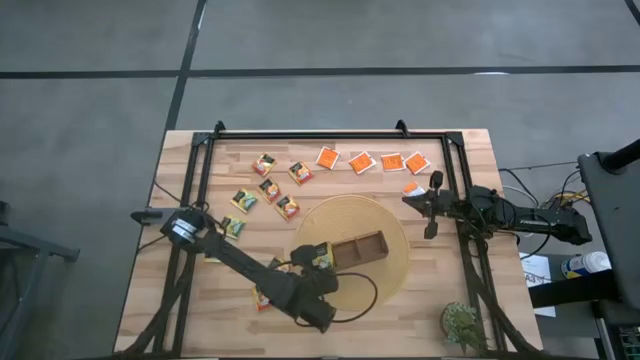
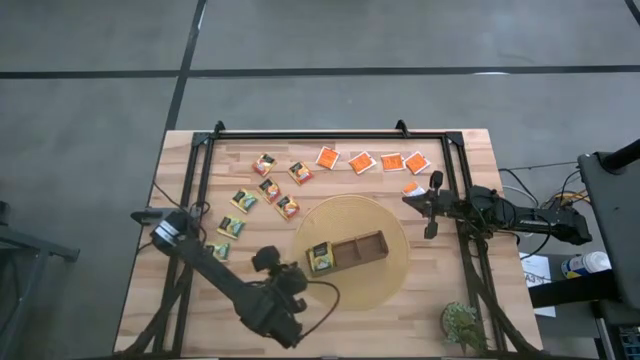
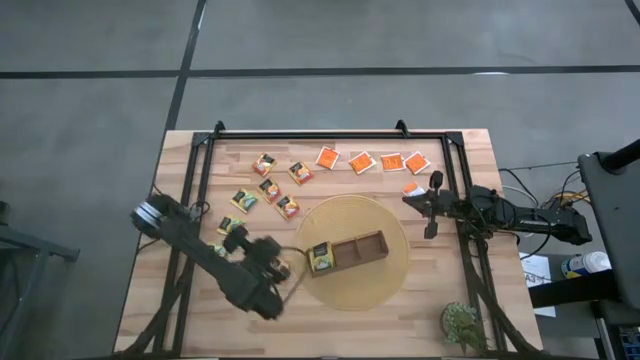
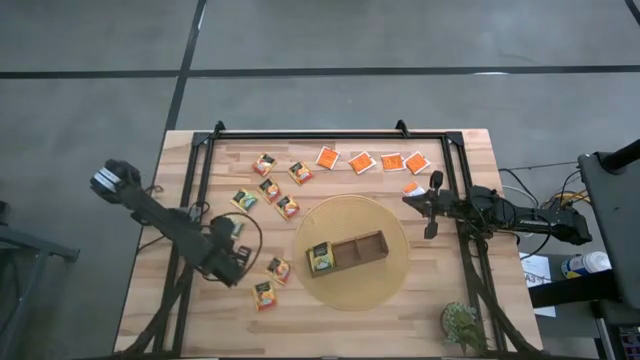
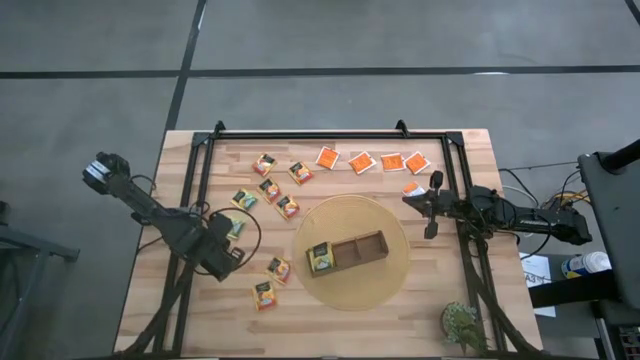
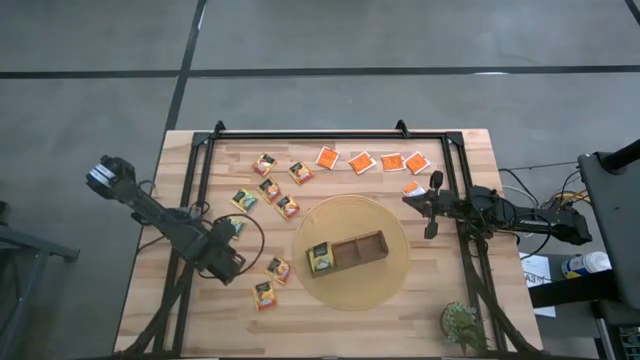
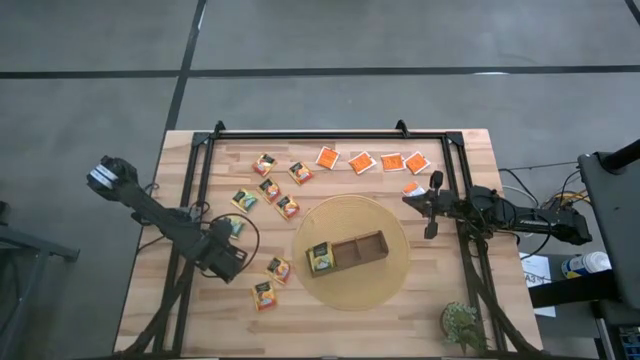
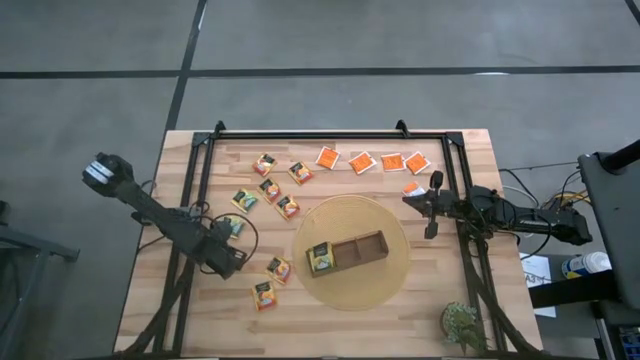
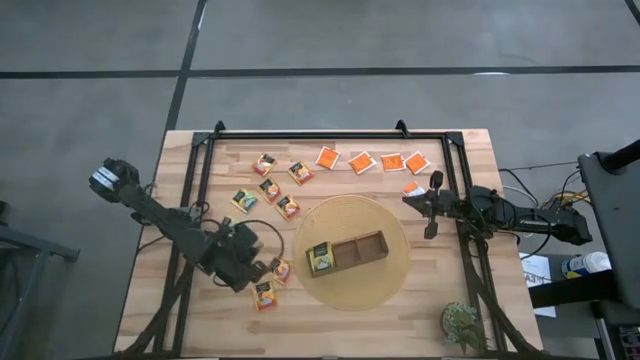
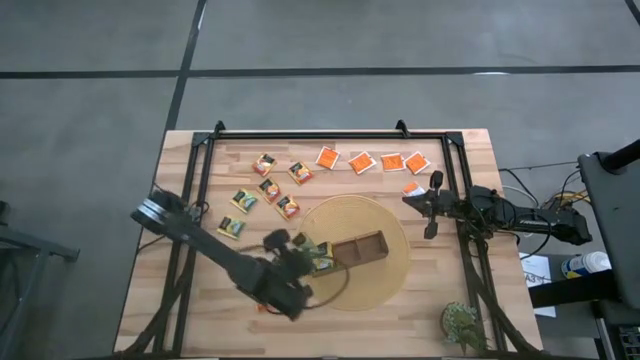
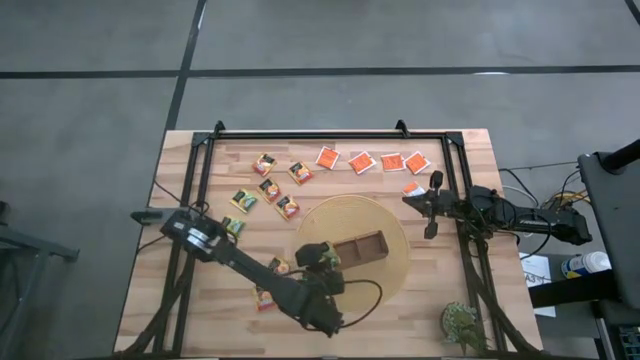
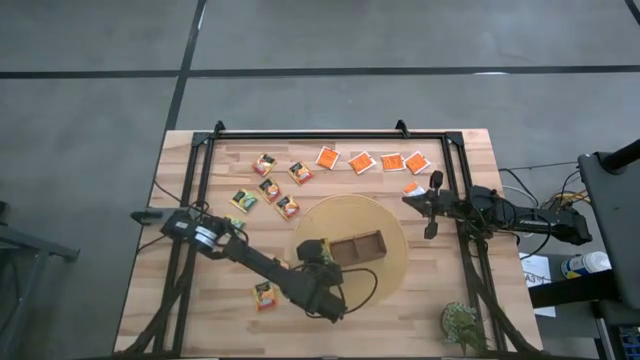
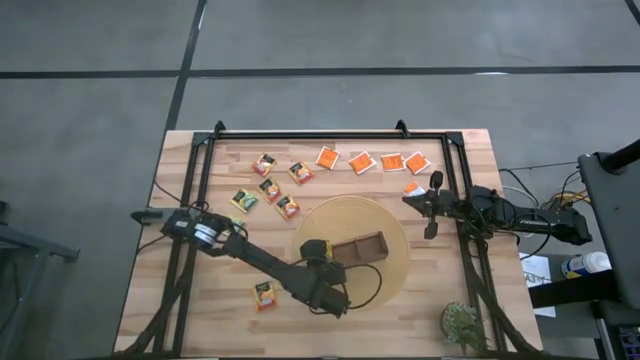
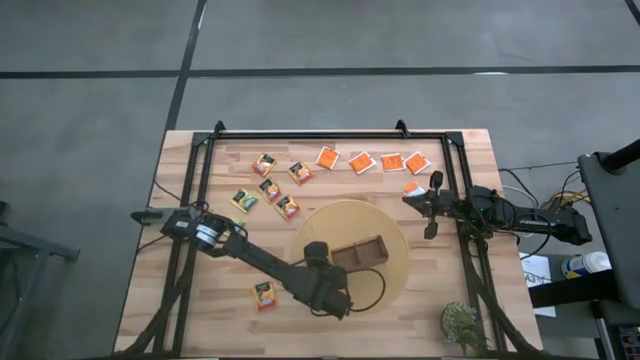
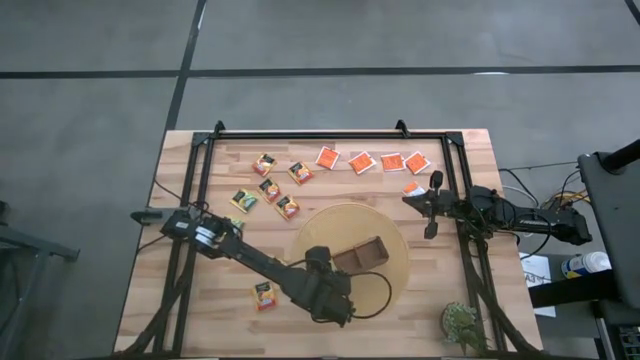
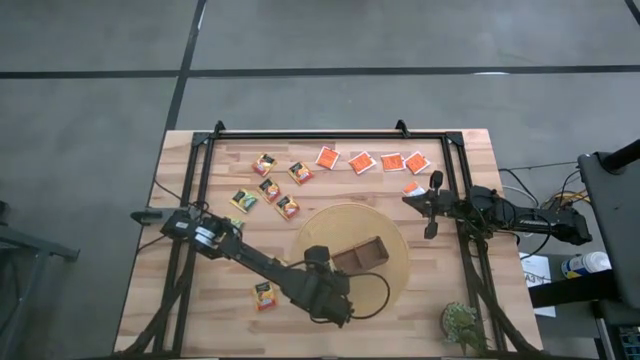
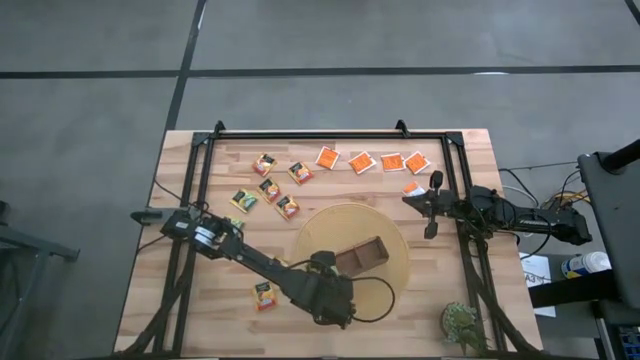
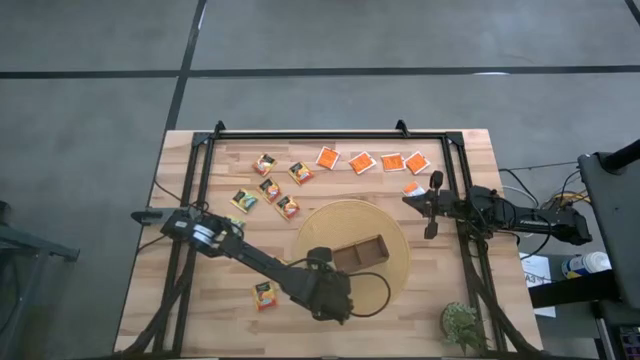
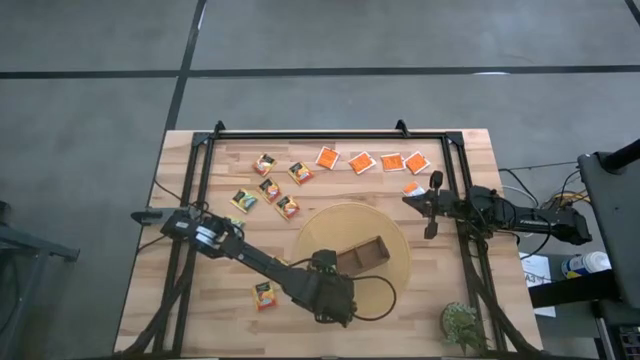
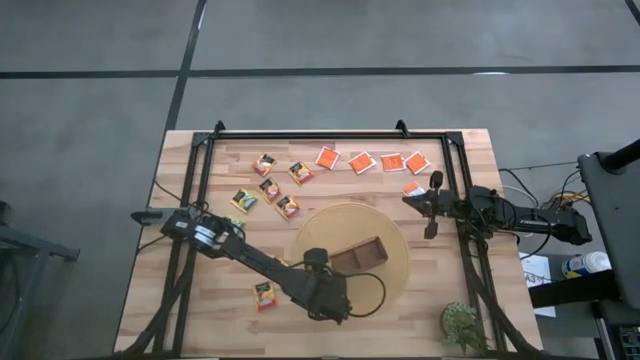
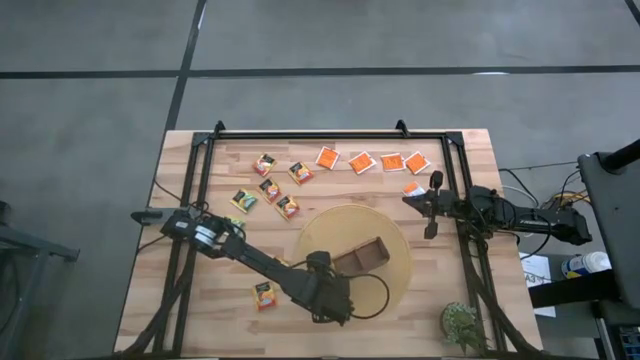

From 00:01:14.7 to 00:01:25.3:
Task: Pick & Place Tea
Put the green tea bag into the left section of the wooden organizer

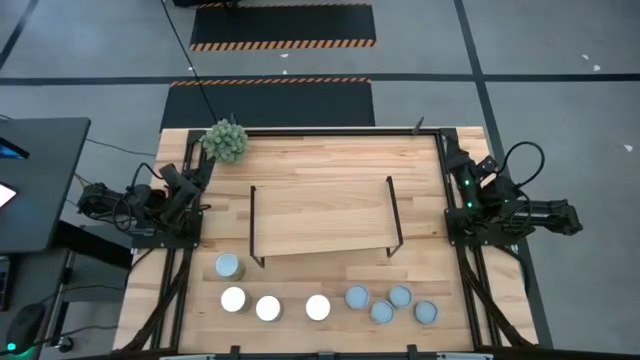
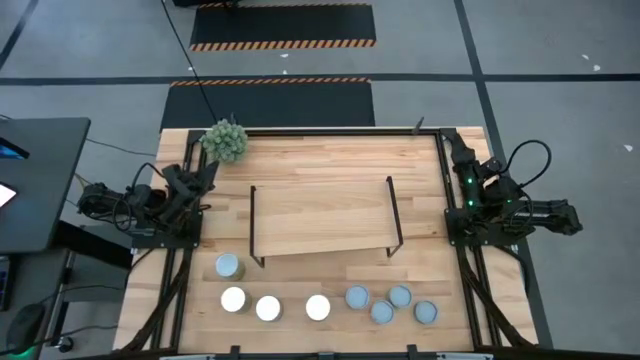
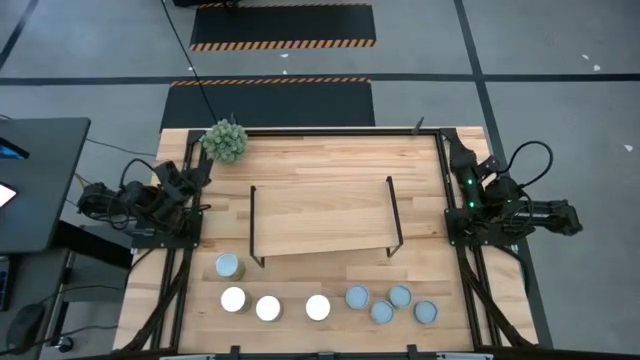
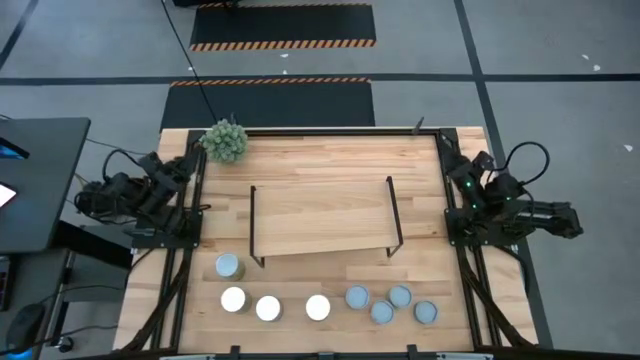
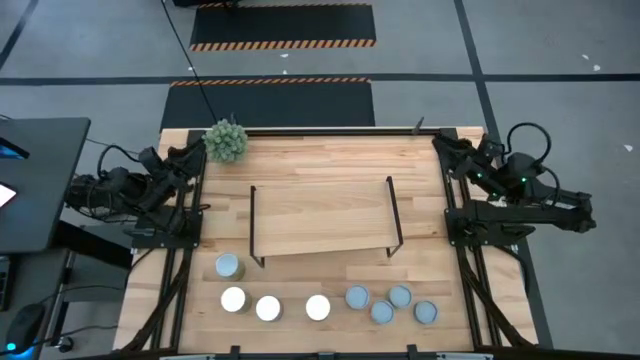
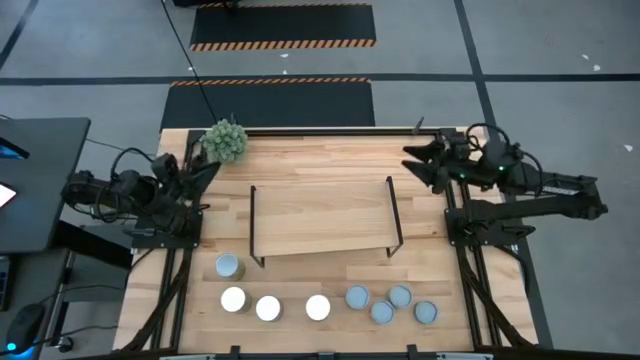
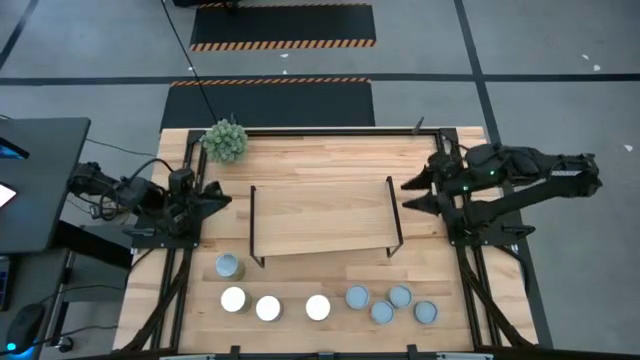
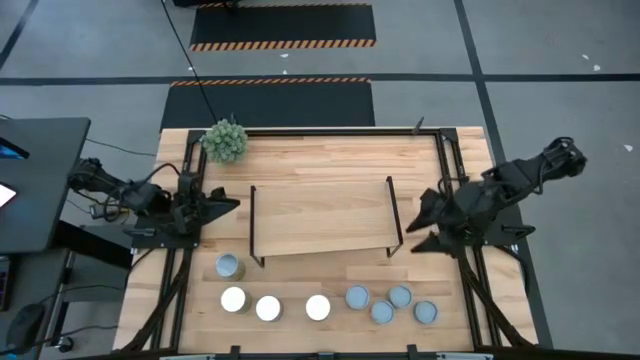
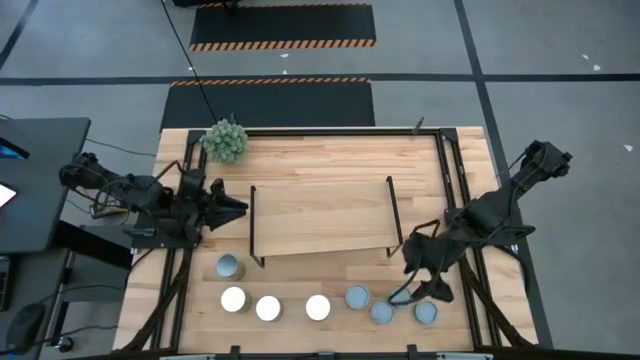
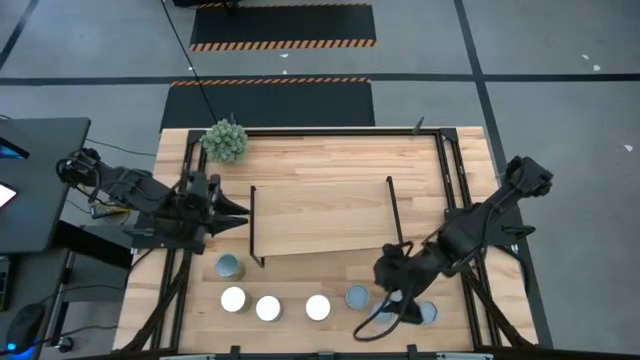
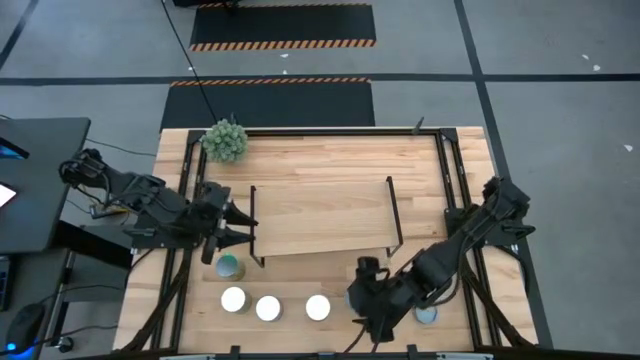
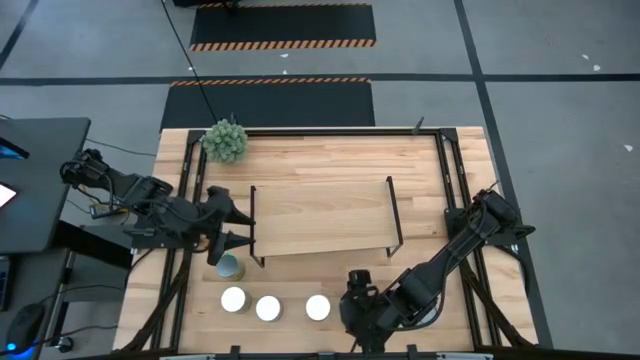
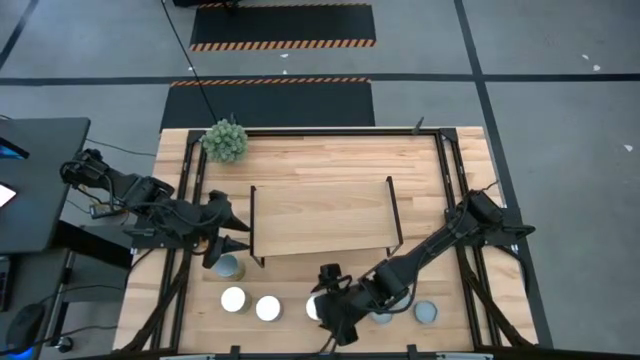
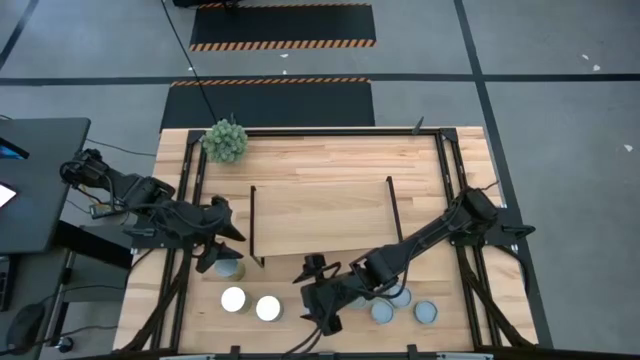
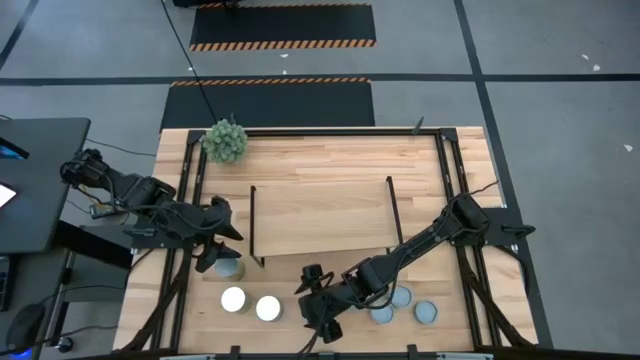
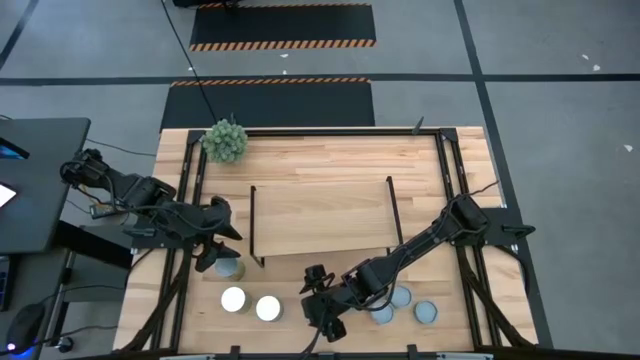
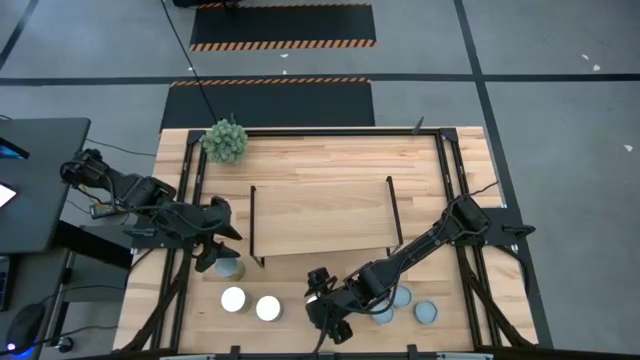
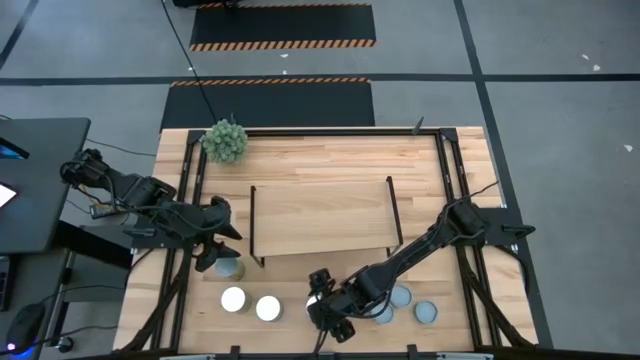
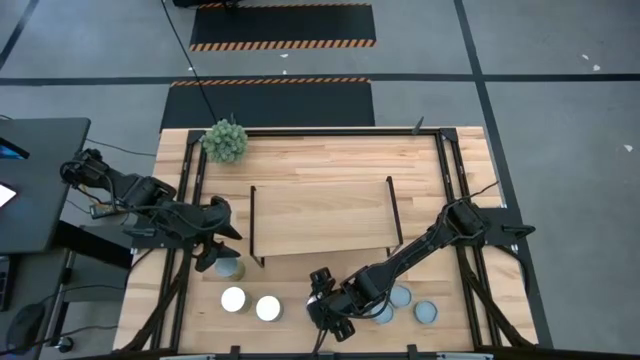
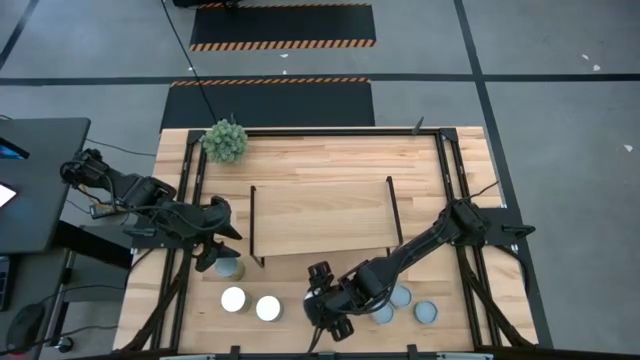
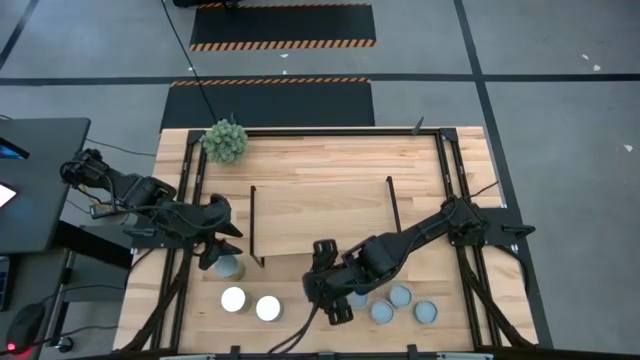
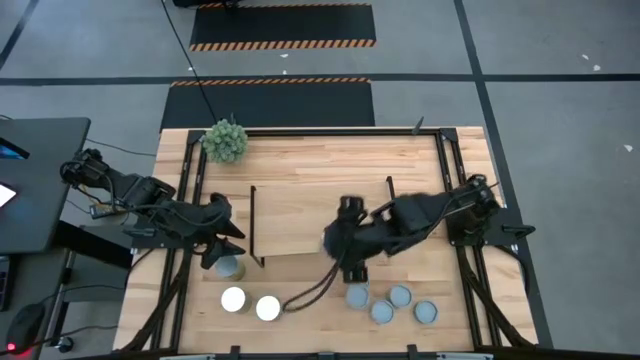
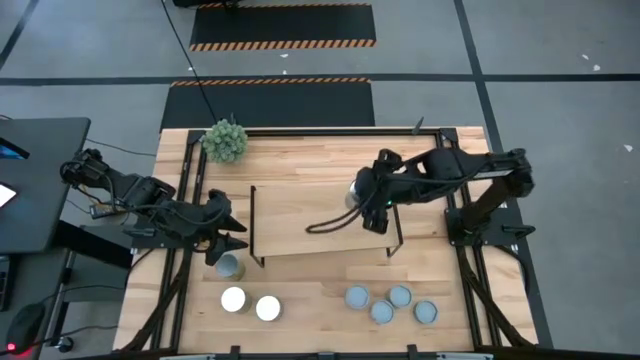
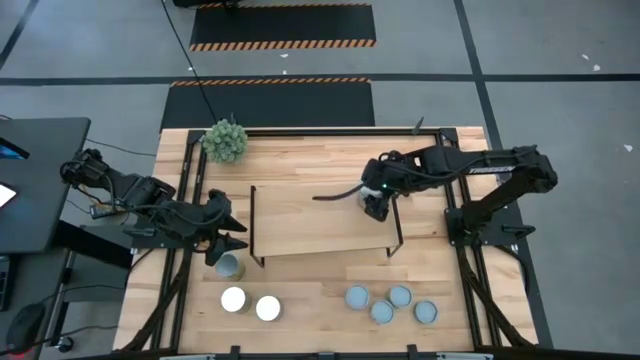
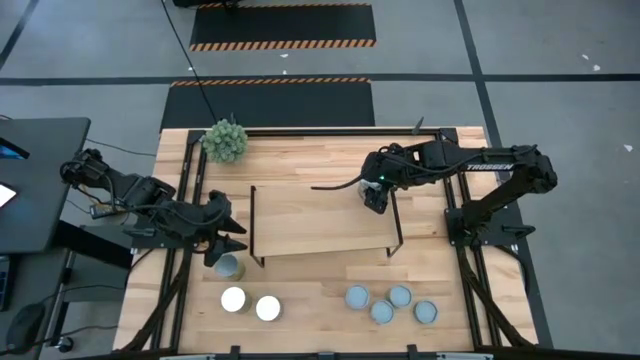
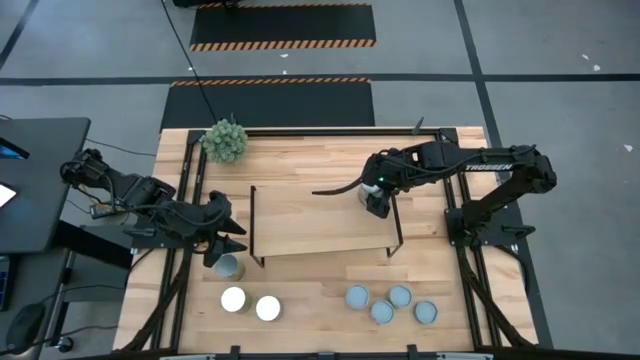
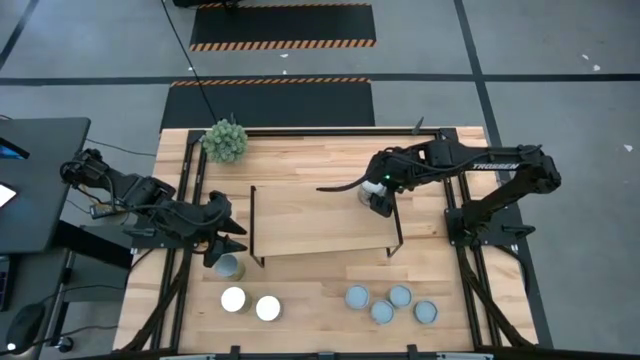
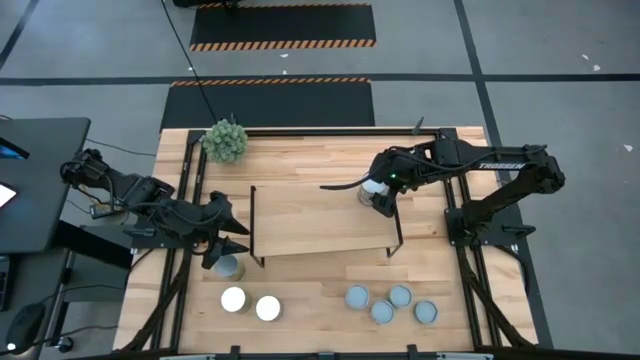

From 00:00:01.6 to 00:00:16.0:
Task: Pick and place cans onto a shelf
Put the canned peaches on the shelf
